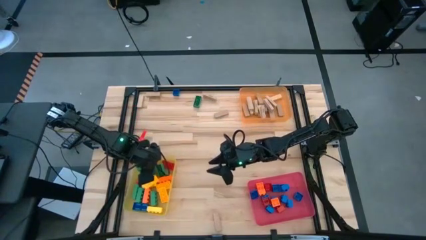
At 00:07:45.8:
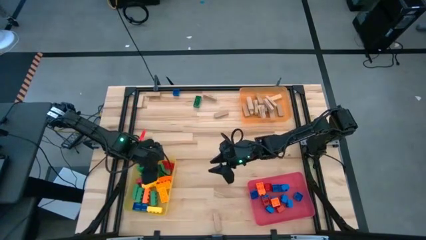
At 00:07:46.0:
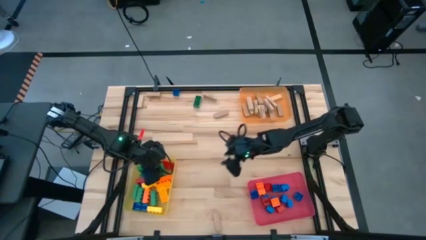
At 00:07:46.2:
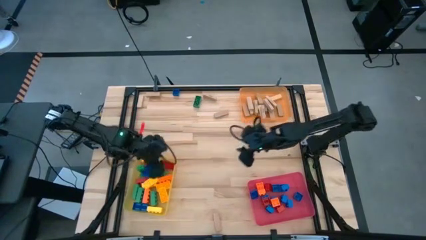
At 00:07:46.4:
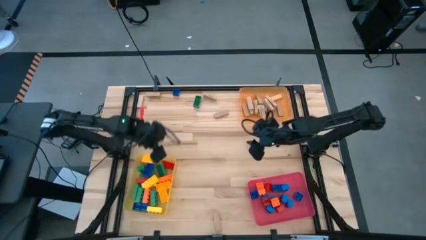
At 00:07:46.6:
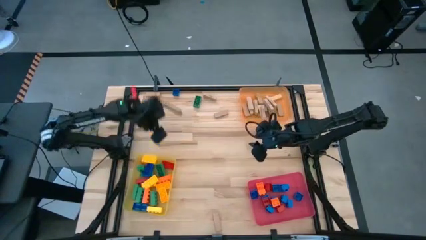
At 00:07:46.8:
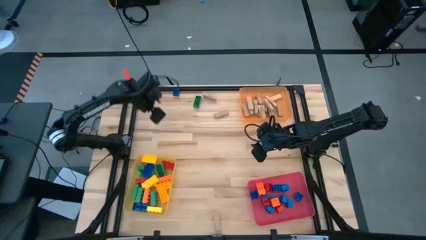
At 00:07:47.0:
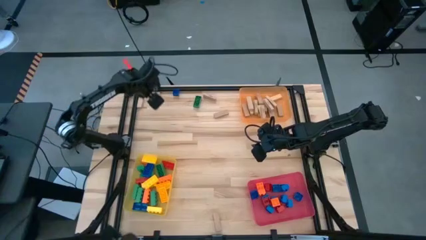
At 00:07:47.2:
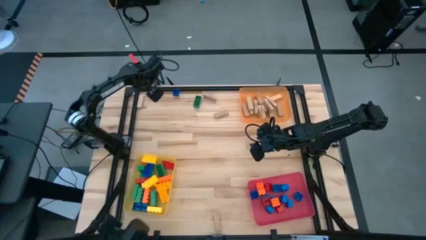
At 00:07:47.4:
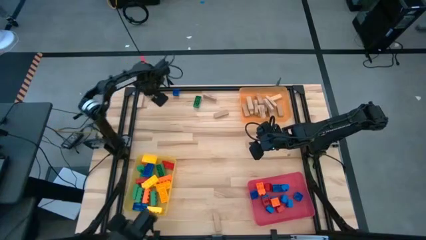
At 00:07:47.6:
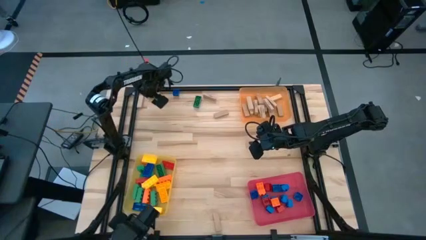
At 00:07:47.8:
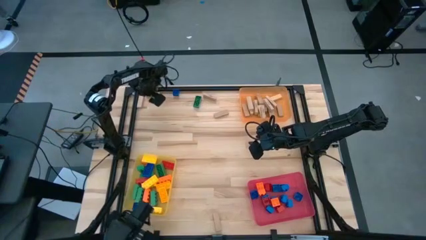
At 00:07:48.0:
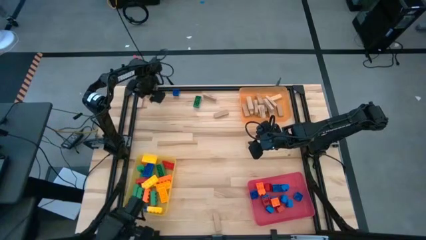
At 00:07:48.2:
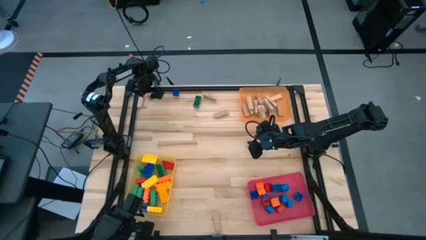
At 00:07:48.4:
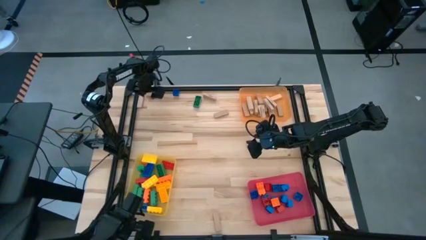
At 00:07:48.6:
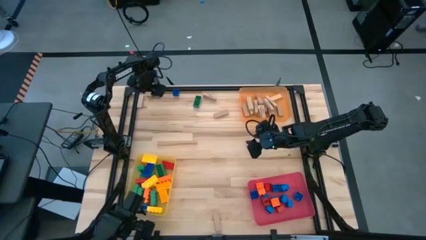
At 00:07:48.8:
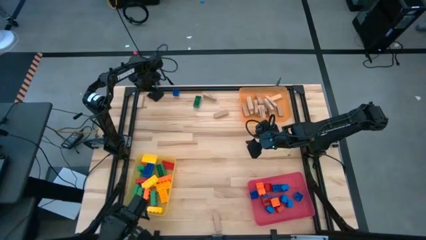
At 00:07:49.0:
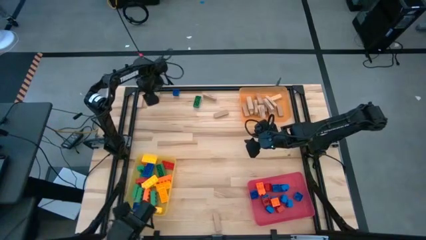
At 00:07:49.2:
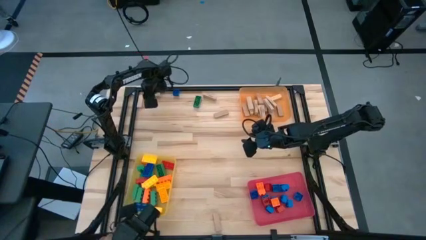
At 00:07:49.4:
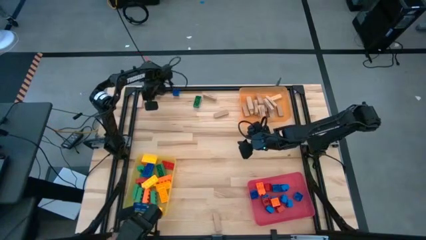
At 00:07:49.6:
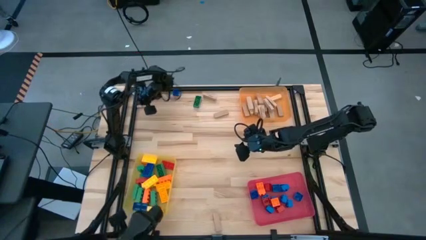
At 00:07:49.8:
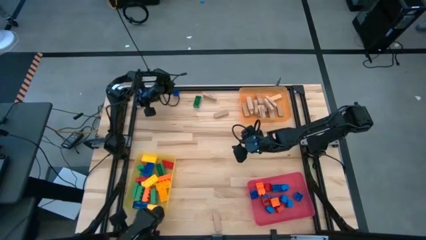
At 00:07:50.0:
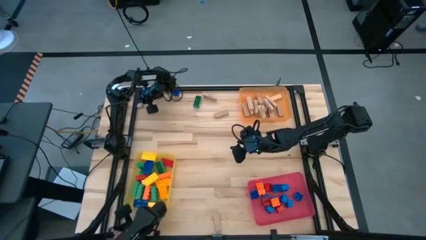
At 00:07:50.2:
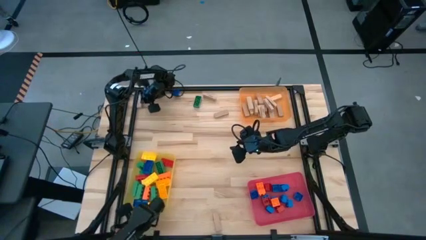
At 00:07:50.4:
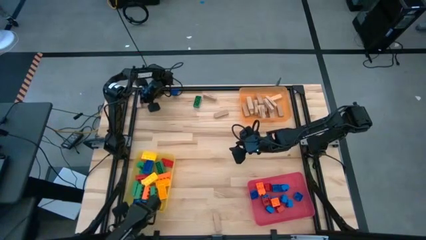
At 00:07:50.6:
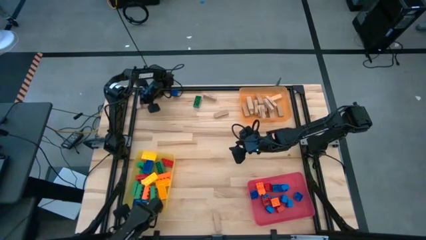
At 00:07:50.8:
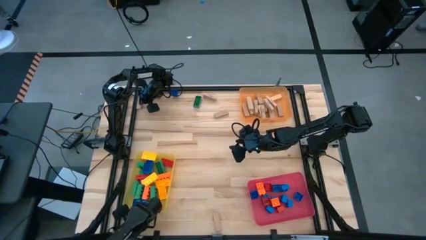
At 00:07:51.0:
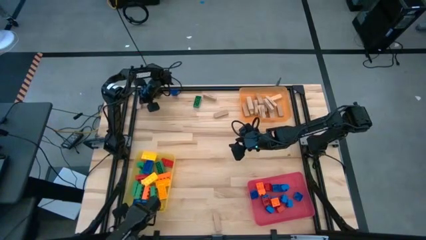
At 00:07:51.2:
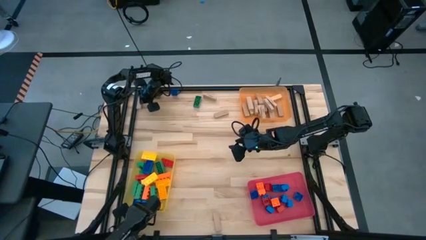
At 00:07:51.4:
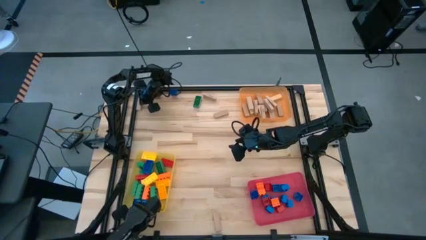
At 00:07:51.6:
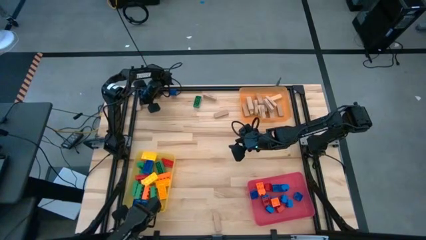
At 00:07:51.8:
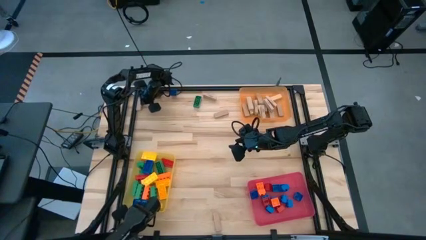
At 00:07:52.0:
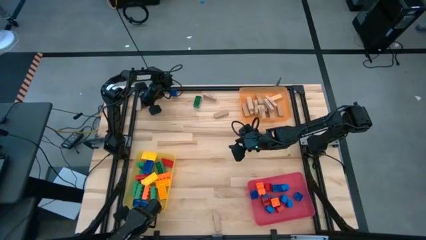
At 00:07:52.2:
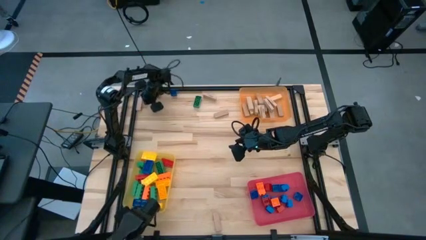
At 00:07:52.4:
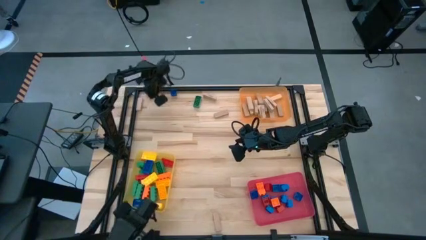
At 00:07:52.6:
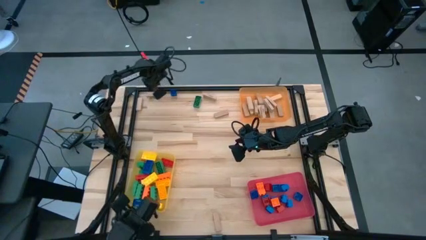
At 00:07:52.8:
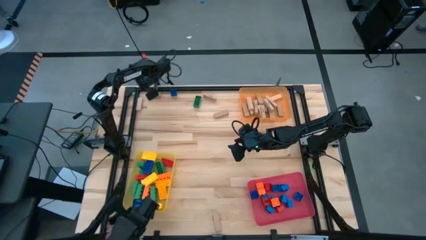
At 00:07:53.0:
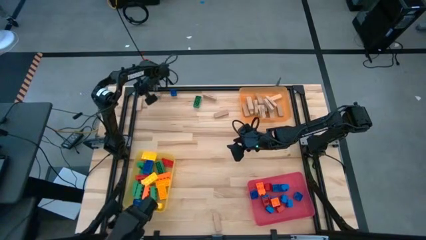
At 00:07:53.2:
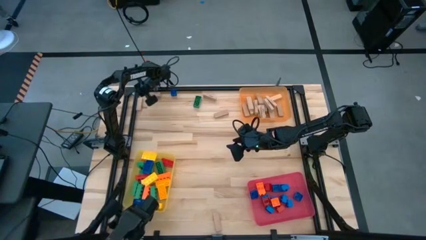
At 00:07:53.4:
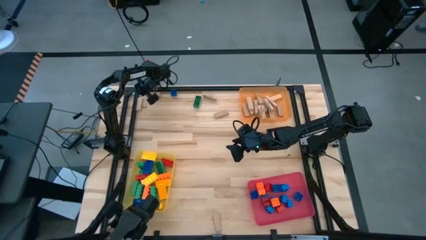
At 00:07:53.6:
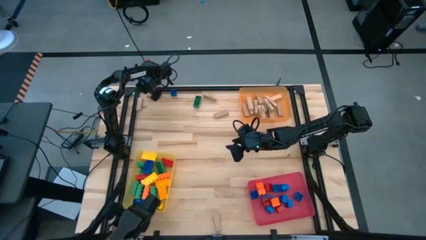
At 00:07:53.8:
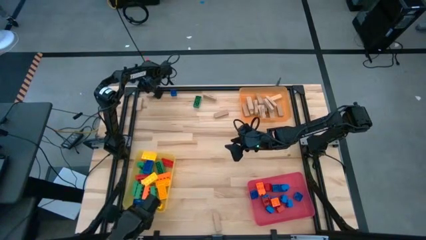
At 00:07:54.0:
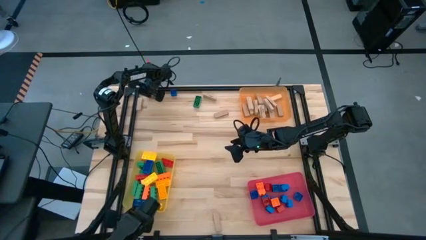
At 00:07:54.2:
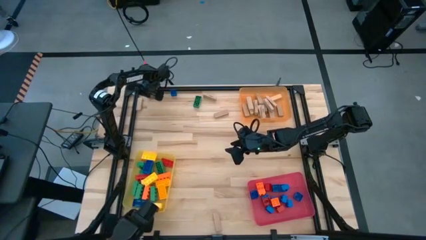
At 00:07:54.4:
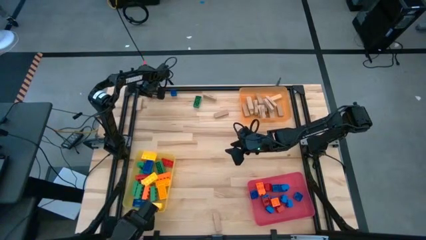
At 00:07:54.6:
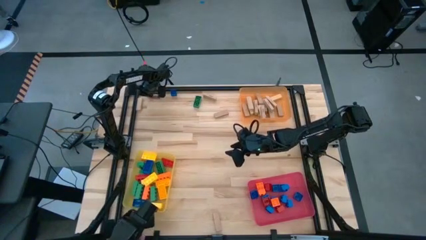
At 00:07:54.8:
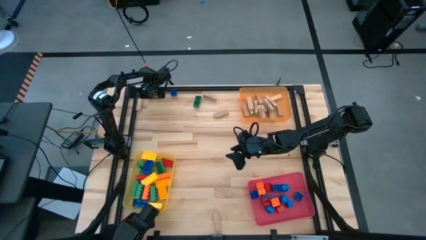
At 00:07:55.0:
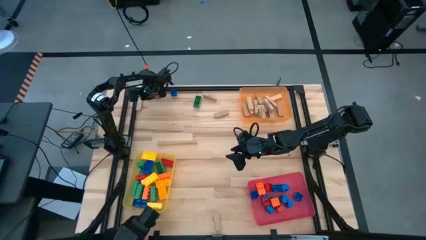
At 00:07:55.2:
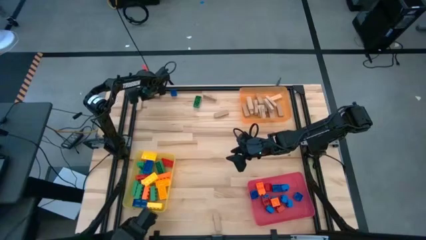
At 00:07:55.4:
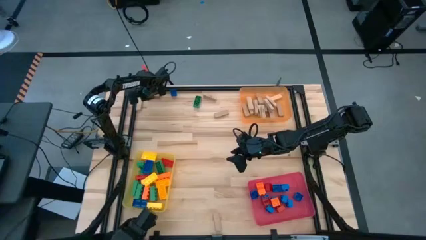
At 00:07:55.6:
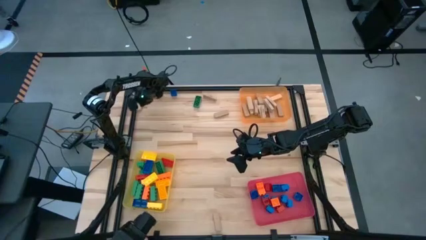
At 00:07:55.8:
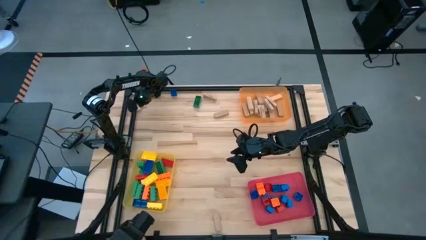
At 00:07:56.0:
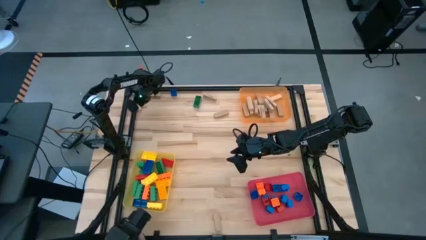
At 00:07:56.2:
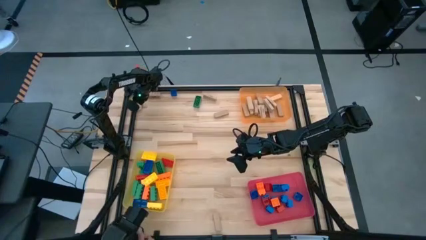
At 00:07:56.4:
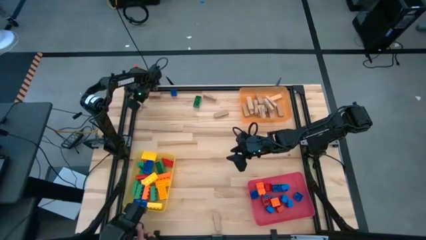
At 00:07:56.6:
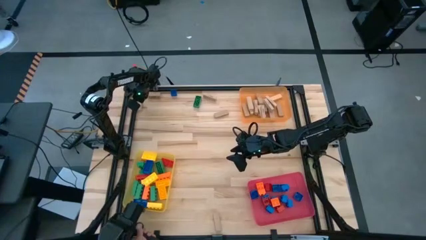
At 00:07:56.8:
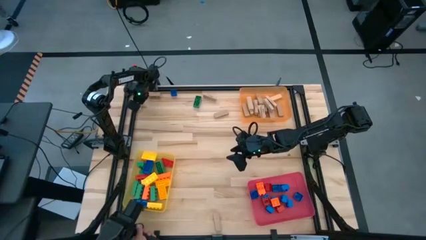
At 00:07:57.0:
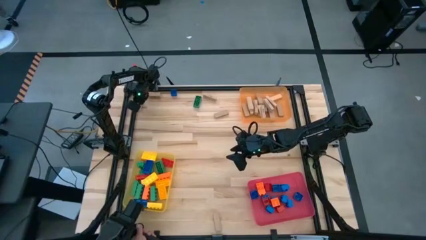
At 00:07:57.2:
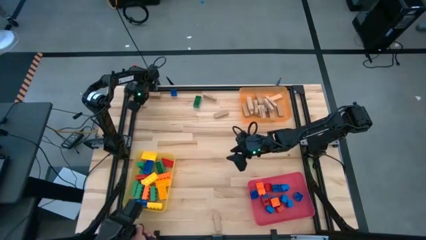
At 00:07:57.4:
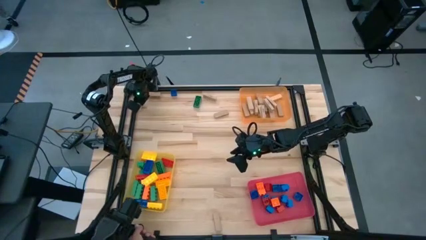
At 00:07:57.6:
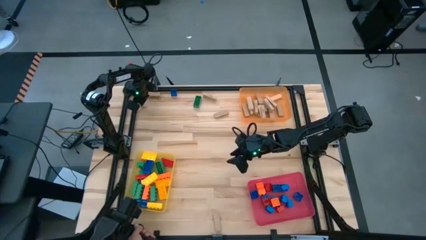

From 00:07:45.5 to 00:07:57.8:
Task: Sort blocks by size
Put the brown block into the orange bin

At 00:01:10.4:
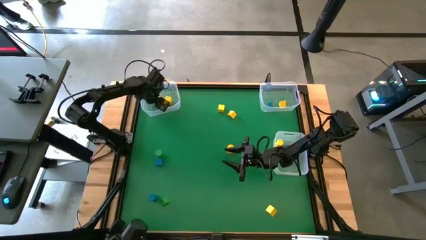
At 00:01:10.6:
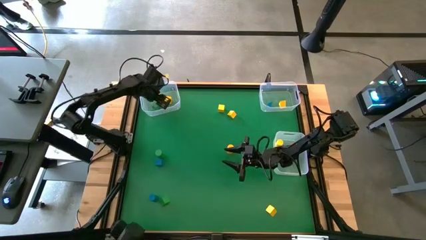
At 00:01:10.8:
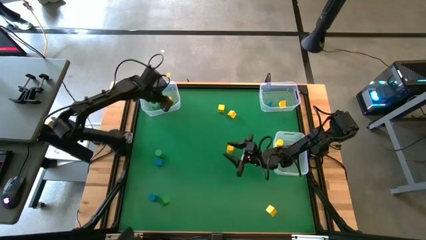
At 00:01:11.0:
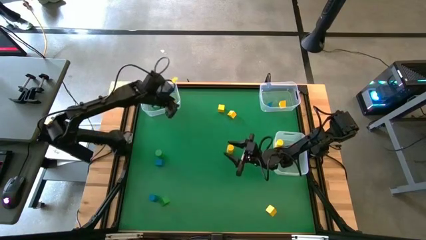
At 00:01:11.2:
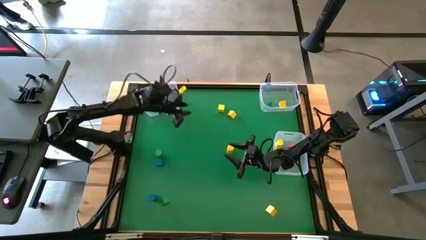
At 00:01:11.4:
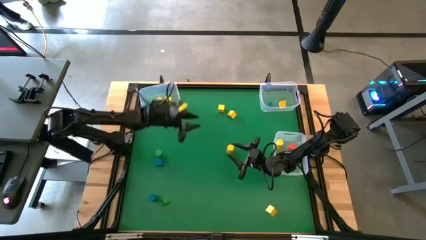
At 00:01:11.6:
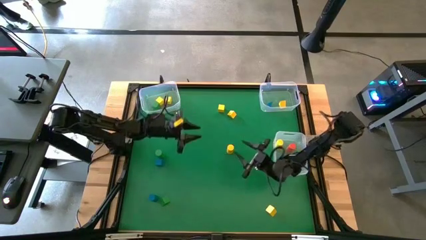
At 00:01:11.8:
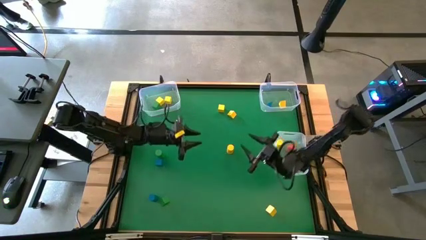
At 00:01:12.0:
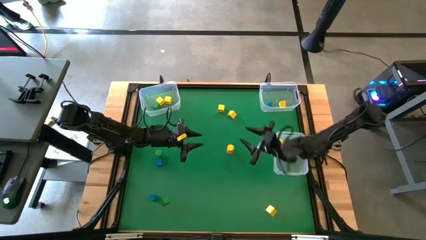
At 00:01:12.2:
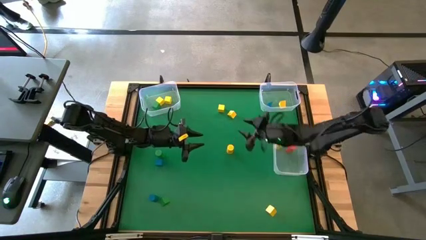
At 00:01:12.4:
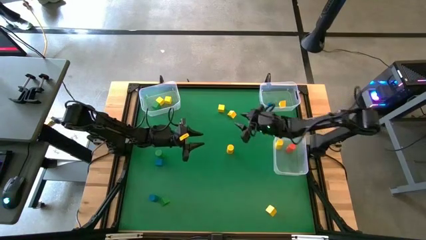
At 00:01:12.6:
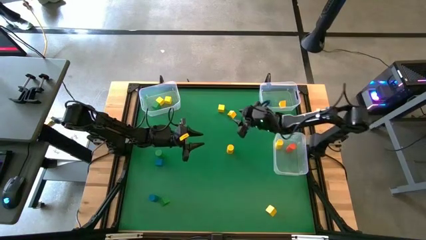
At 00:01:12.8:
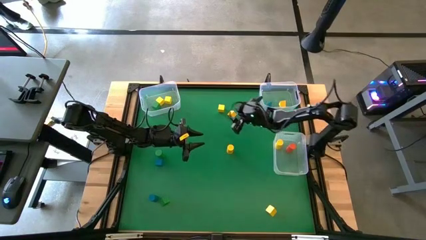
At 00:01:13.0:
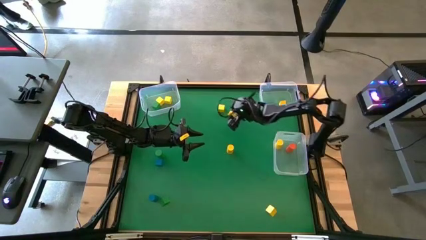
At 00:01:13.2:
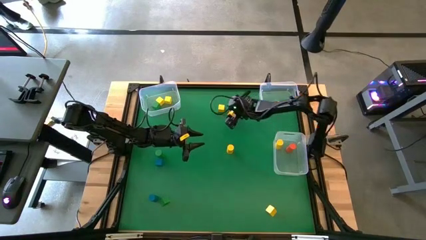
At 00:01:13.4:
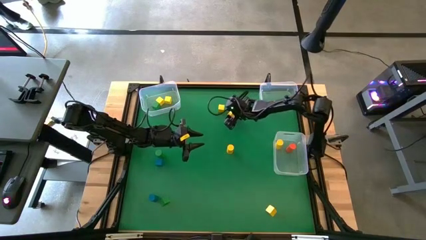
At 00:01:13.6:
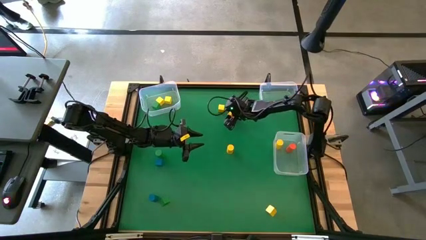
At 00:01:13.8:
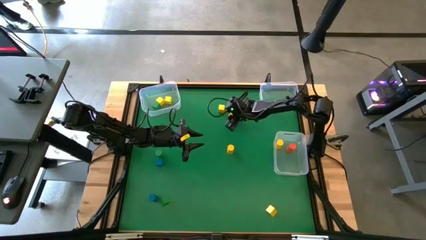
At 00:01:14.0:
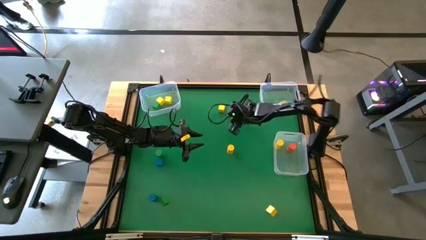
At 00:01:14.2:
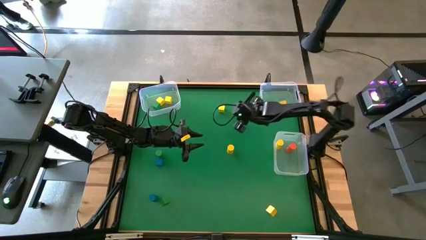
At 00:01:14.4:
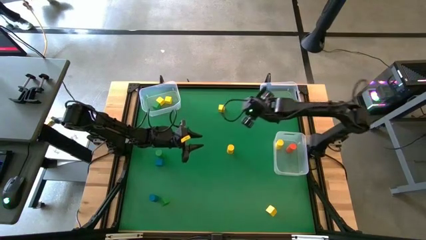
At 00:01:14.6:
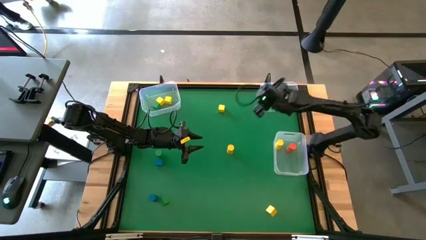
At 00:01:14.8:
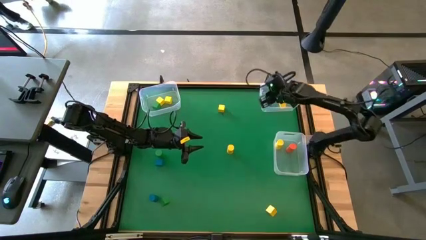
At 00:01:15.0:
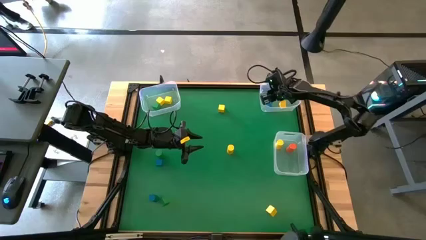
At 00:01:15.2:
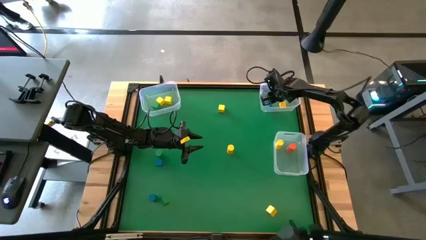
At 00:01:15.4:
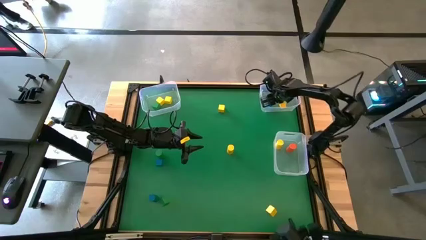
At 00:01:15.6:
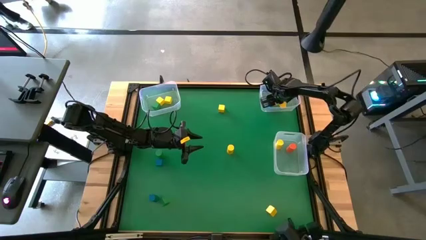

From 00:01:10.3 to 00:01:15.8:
Task: Sort blocks by size
Put the yellow triangular block into the top right transparent bin
